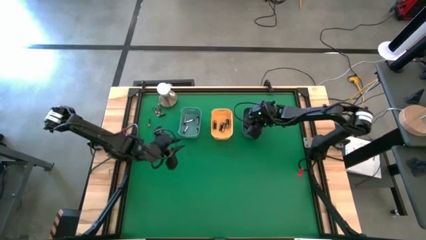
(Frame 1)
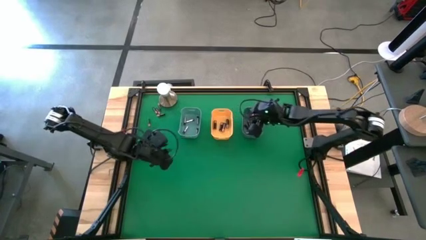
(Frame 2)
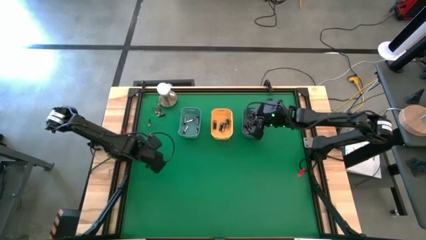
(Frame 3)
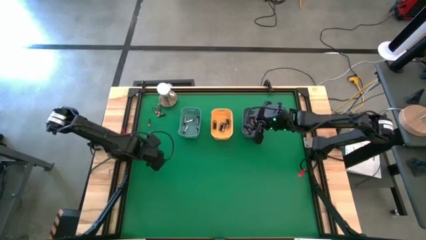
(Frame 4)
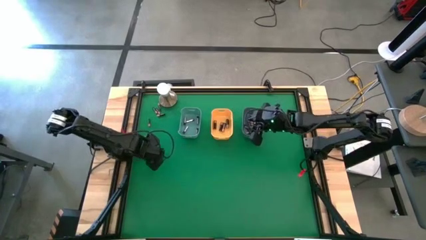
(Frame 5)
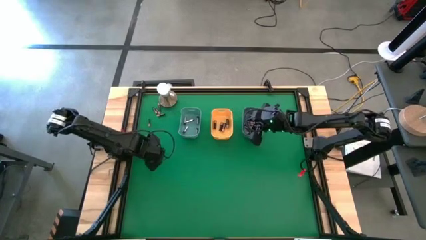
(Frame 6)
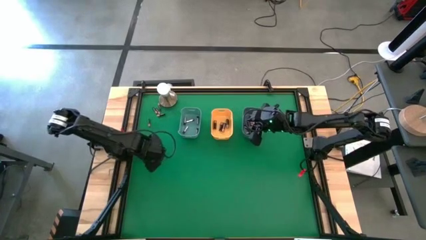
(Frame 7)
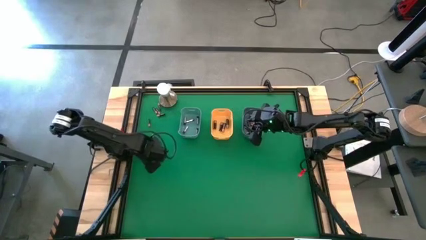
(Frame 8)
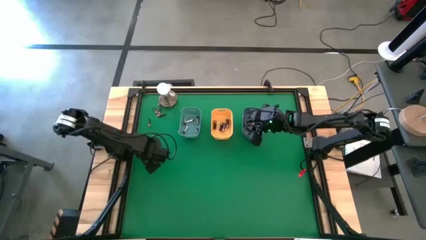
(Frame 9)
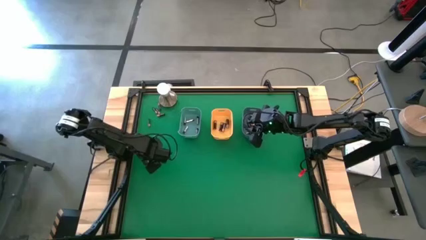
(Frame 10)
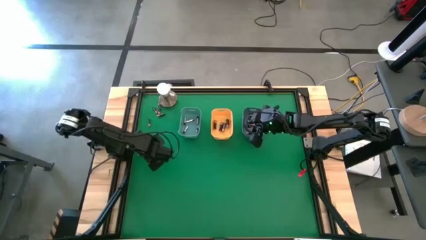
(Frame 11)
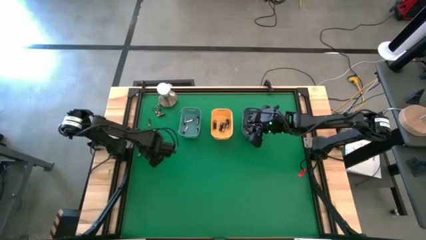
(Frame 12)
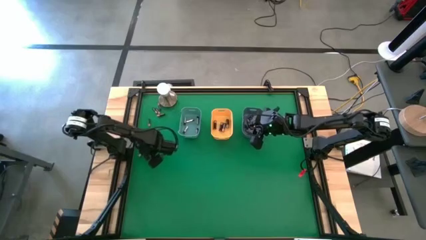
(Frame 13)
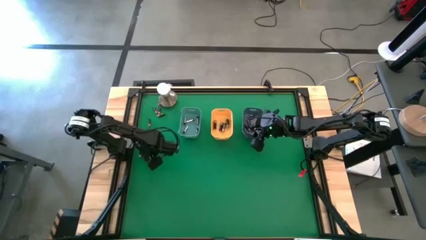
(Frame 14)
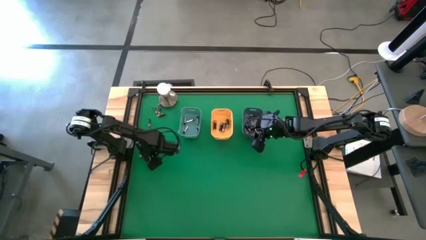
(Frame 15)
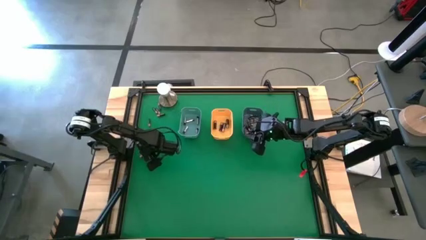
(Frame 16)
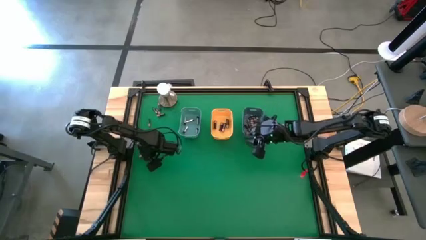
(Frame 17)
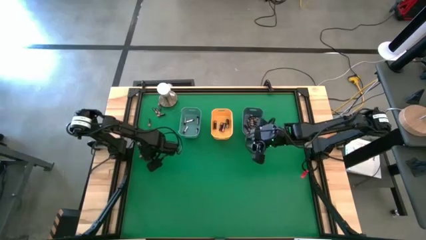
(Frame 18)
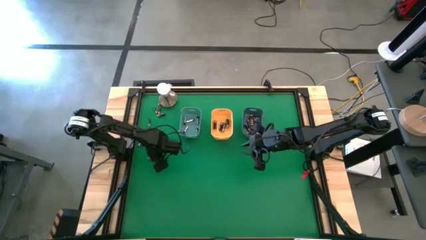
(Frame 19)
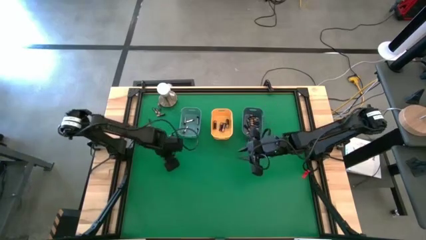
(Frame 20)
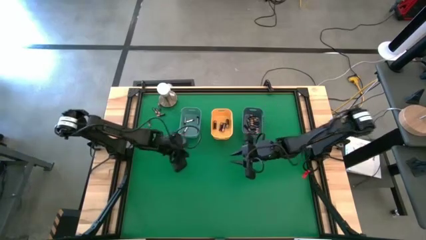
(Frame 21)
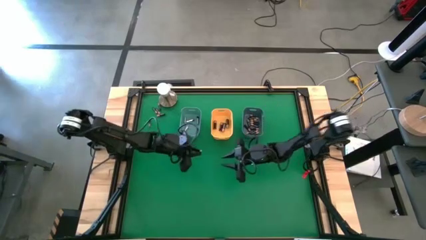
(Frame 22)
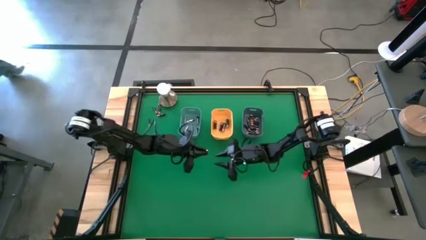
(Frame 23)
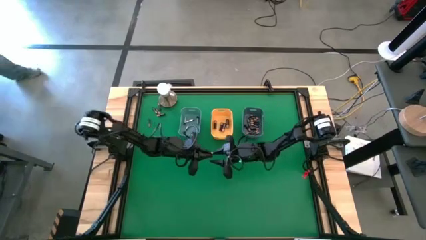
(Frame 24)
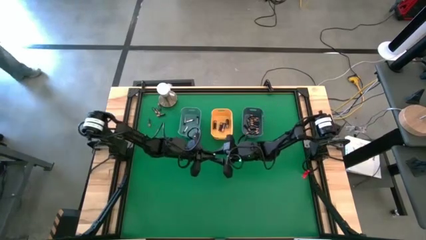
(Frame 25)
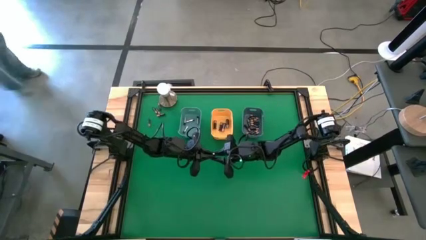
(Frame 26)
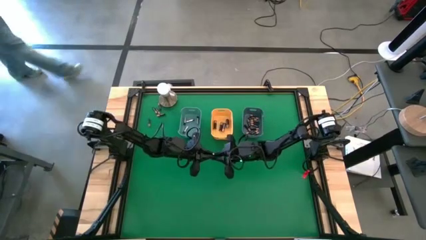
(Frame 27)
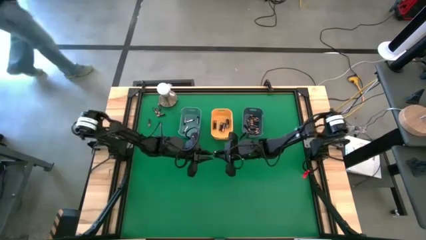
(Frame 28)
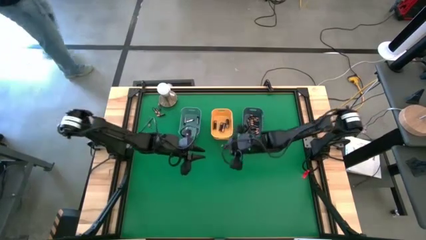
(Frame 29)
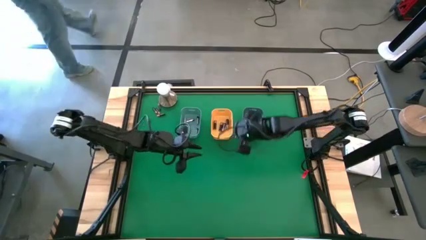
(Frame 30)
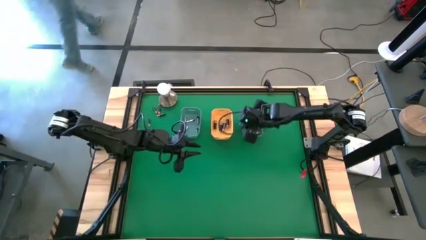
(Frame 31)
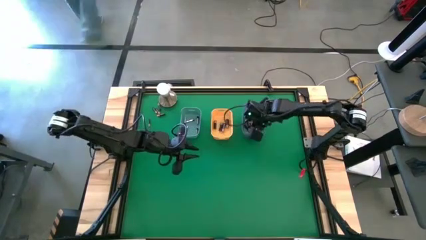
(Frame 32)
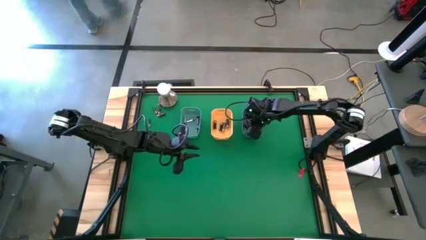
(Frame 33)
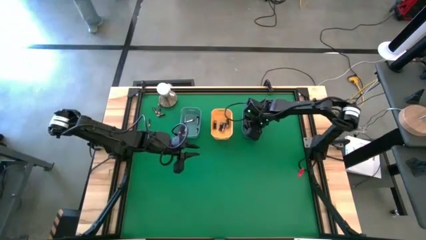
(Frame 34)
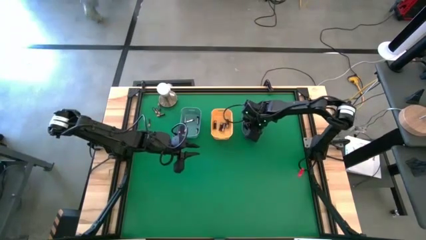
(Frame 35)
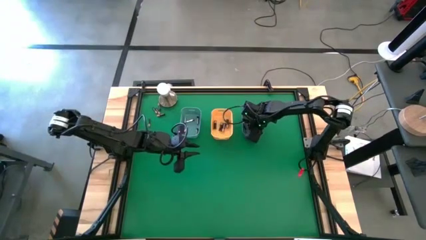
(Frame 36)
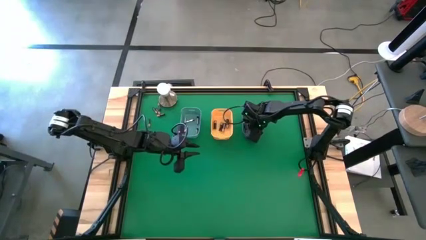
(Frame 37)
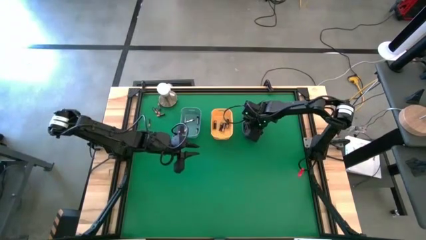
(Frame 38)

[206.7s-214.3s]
Task: Sort batteries
Put the small black battery into the blue bin
